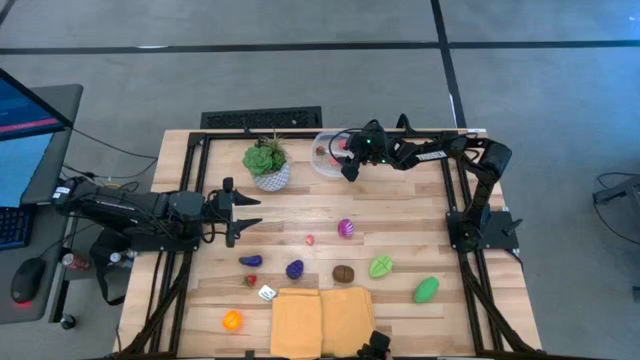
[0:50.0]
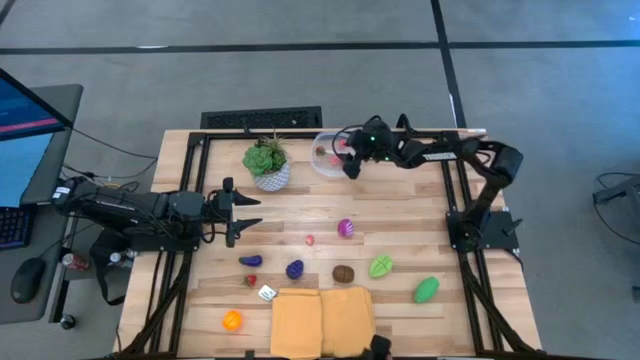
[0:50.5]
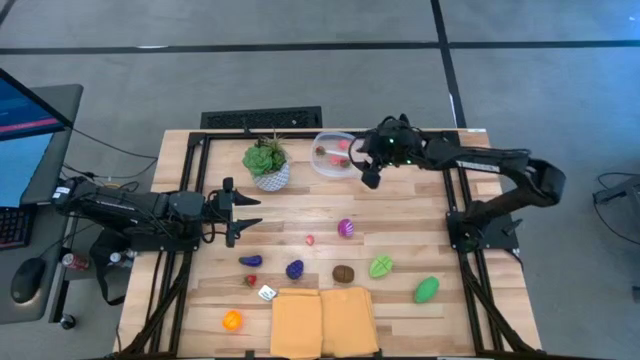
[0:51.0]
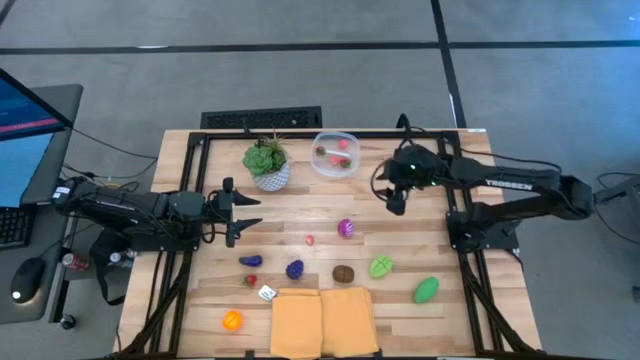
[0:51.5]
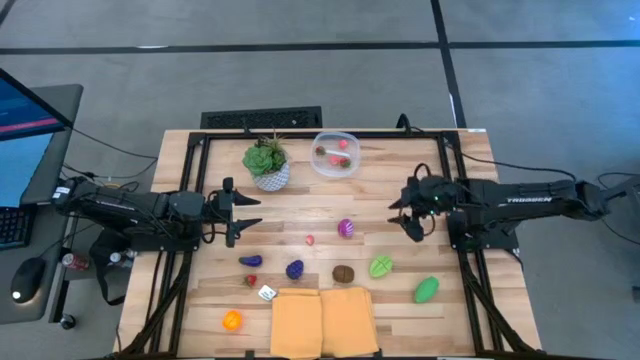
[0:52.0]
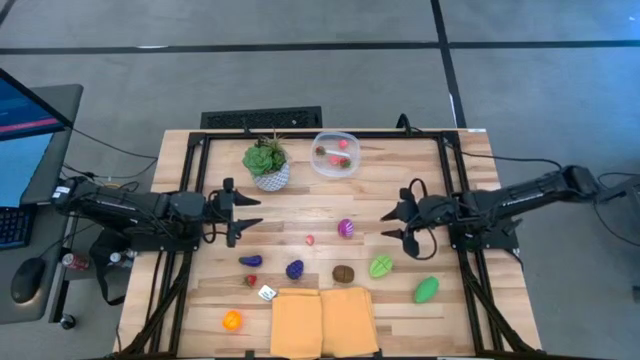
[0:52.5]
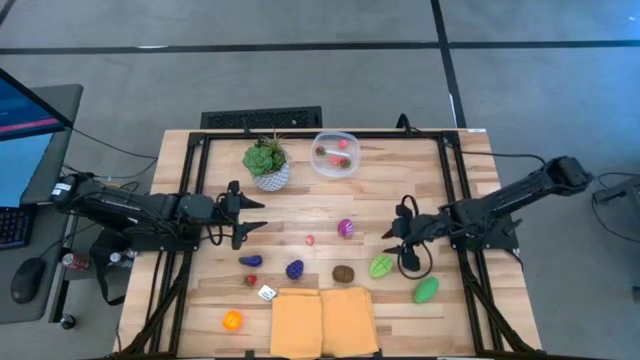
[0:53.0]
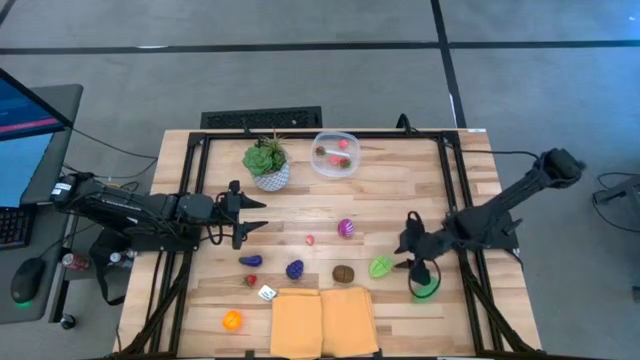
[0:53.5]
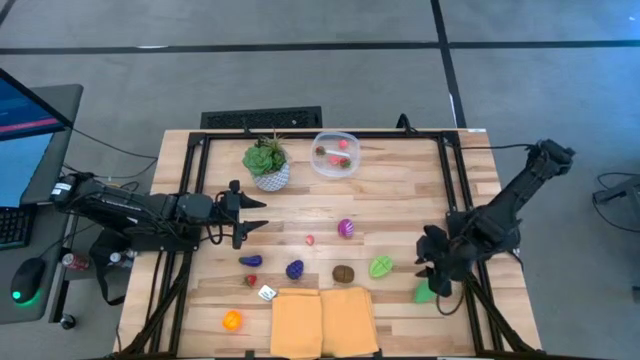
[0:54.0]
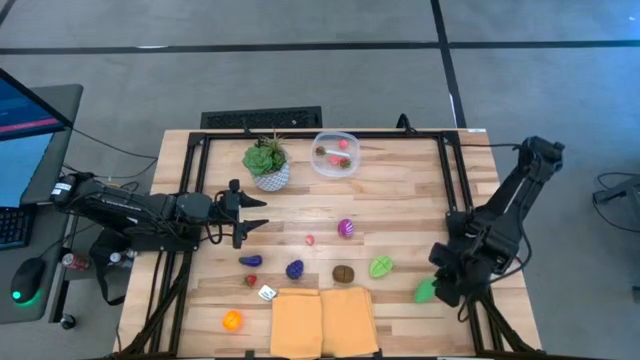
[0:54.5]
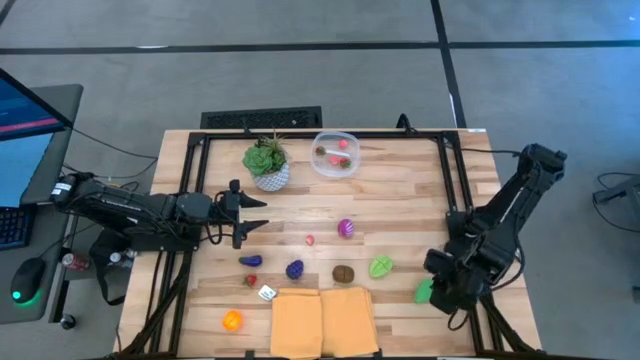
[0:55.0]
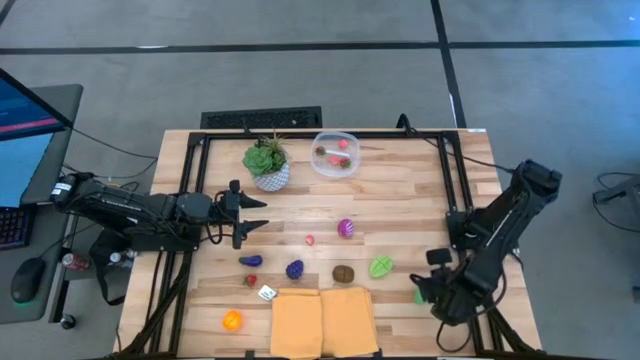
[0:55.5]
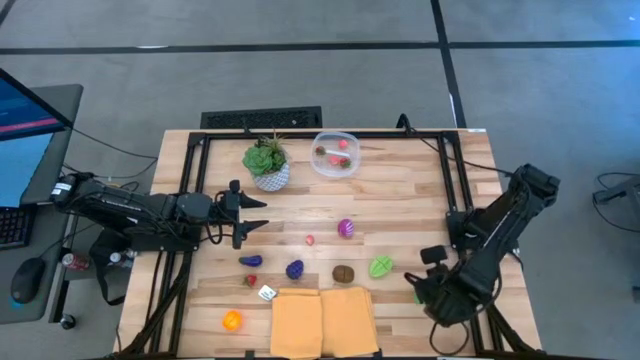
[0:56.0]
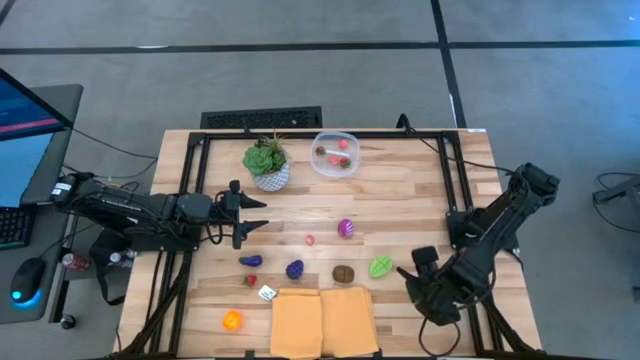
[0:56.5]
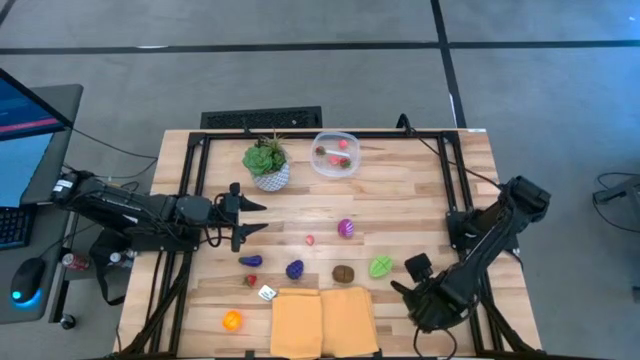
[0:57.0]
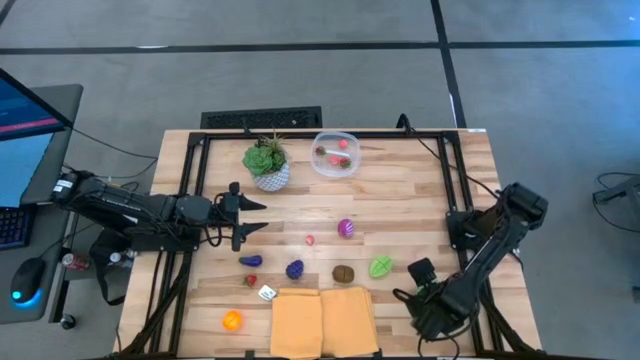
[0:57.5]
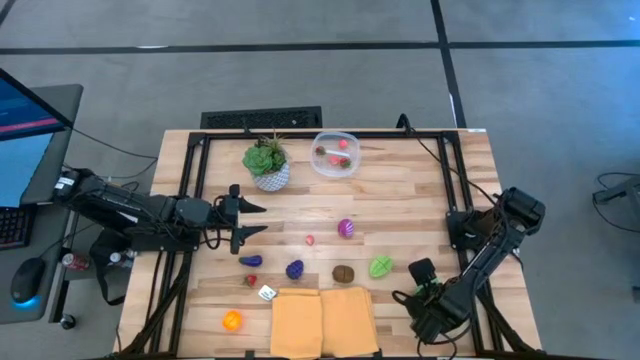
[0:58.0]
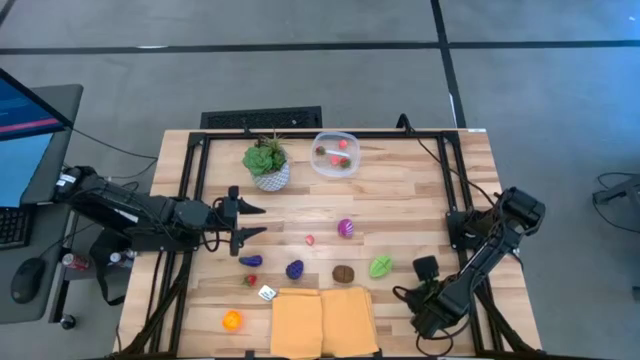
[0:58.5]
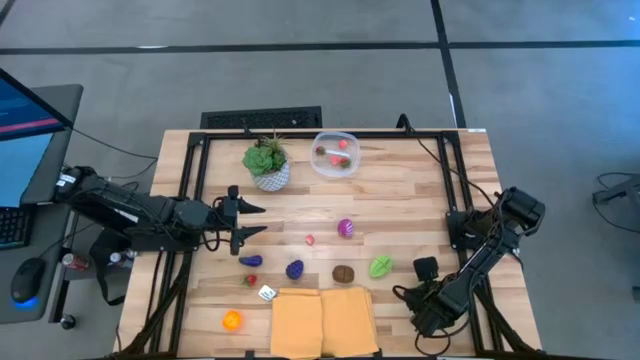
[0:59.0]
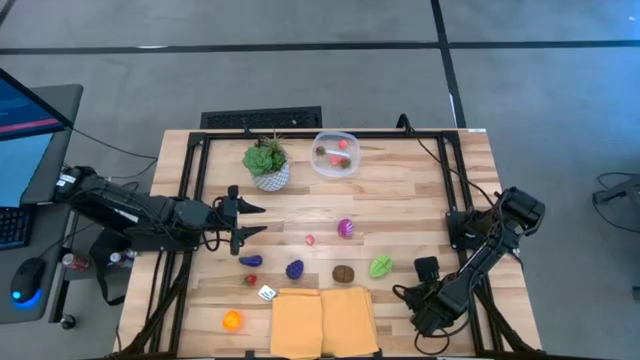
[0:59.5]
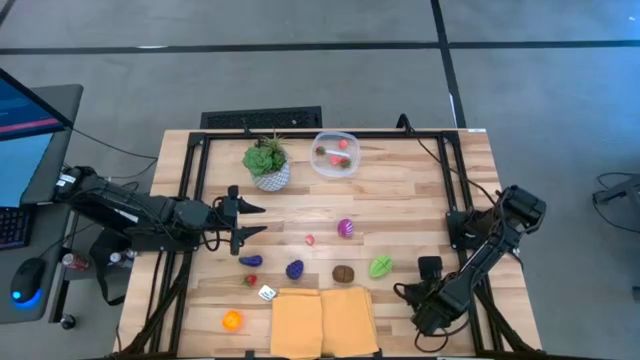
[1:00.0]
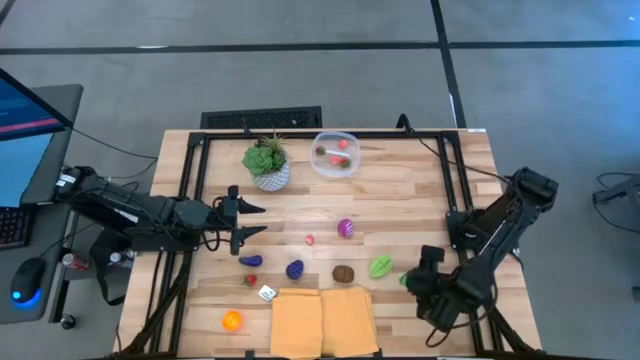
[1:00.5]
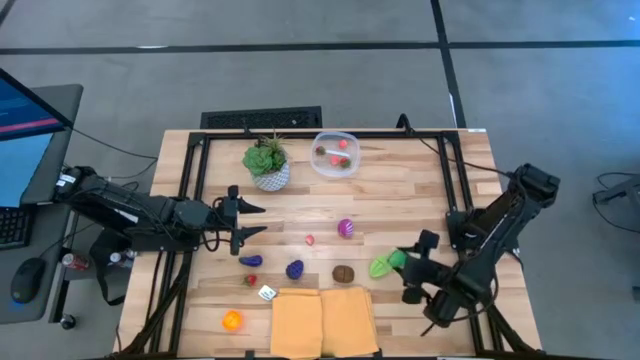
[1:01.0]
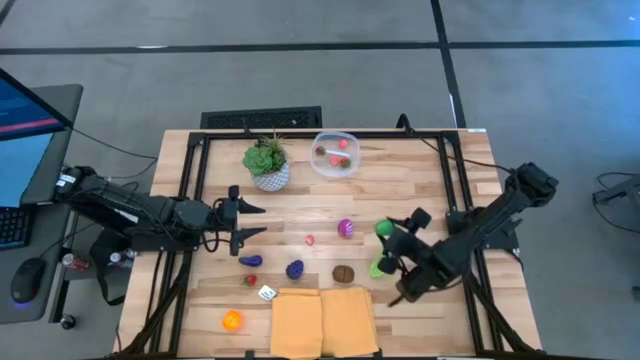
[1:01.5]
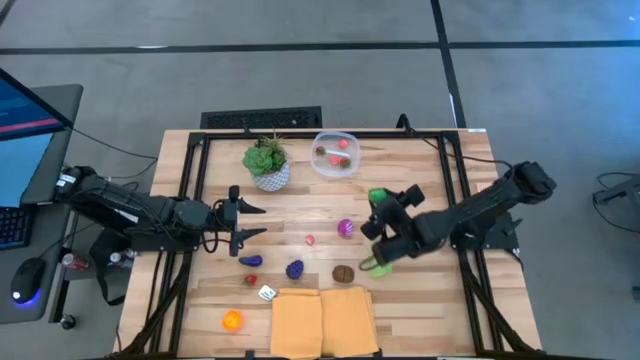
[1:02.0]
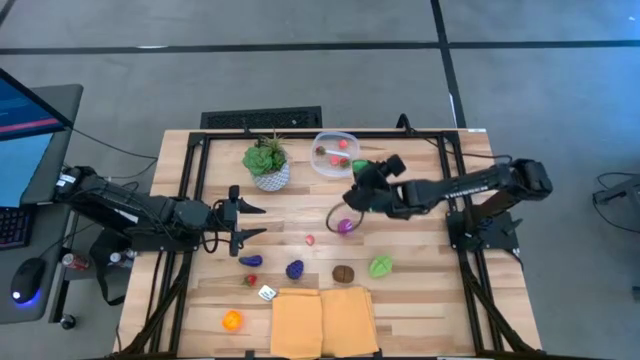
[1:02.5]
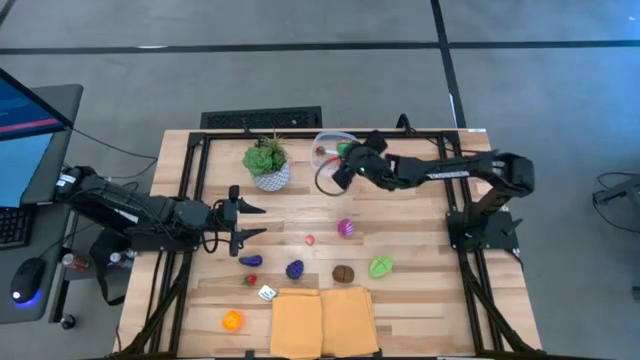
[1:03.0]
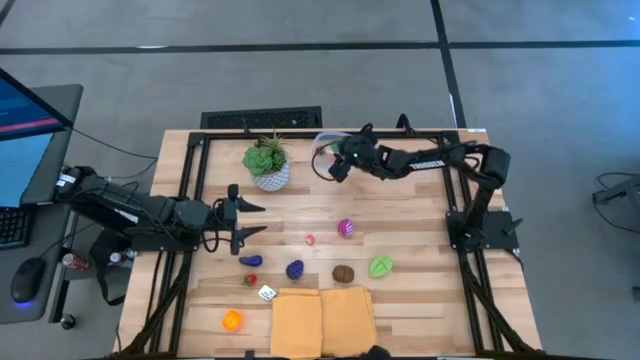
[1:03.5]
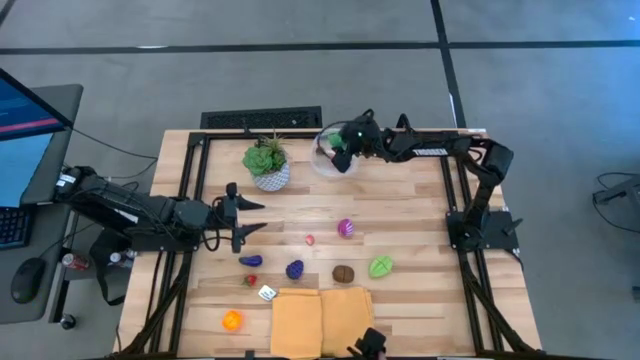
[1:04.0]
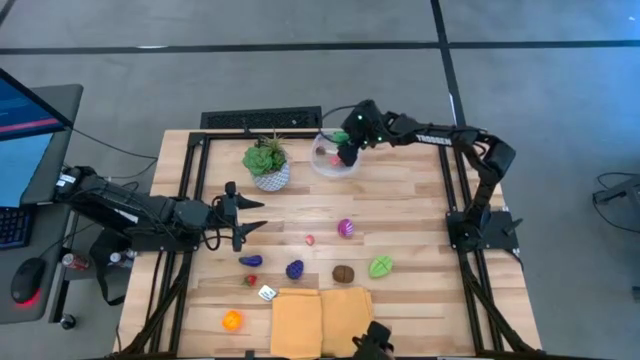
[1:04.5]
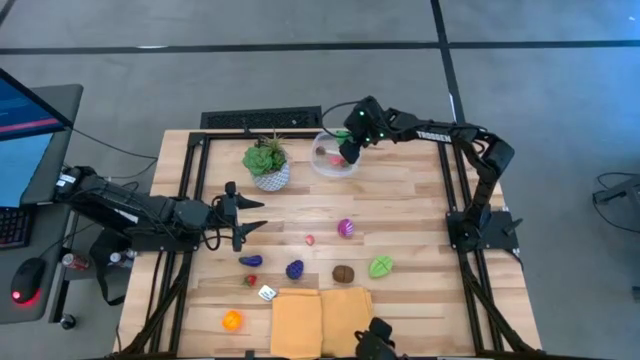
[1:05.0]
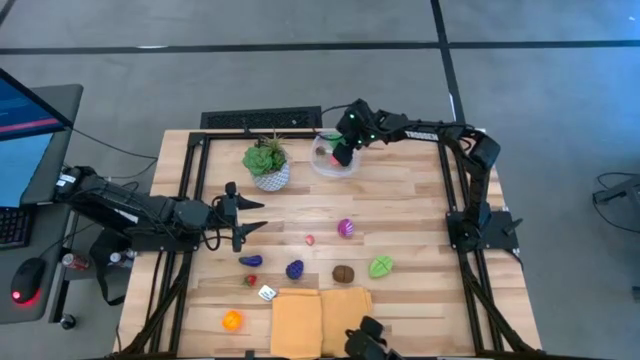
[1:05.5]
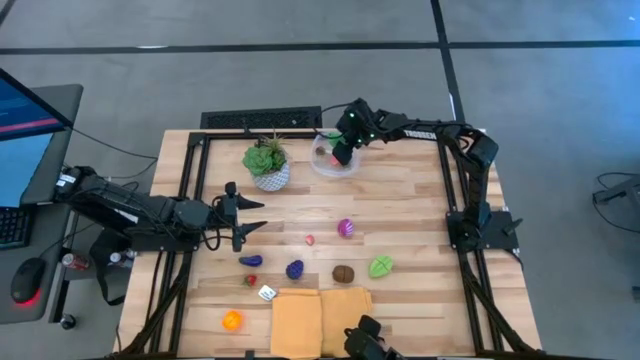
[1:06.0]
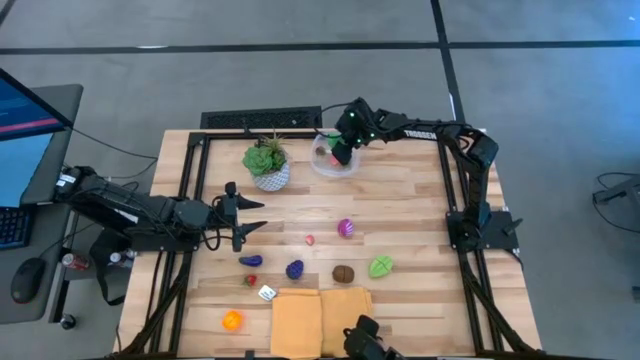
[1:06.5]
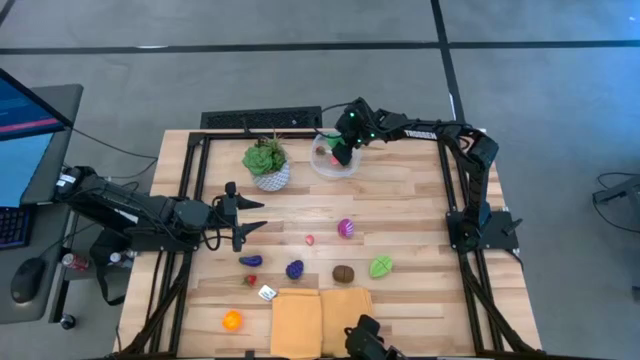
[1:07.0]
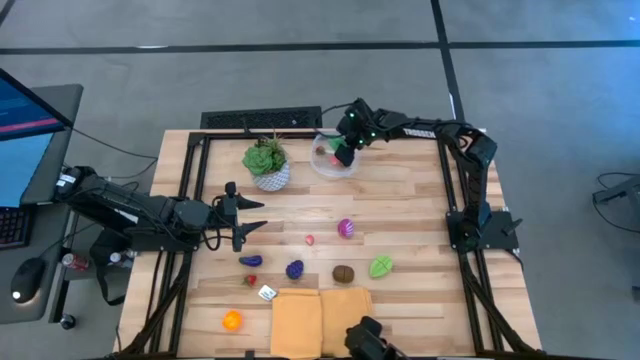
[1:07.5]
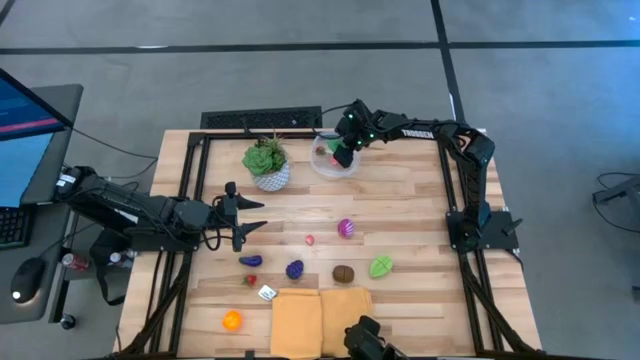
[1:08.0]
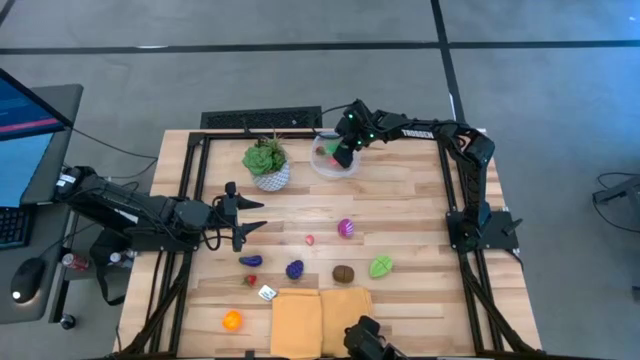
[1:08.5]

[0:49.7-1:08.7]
Task: Pick and placing Produce into tupperware
Put the corn into the transparent bin
